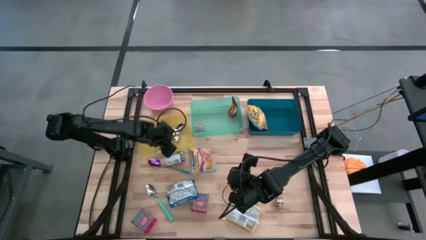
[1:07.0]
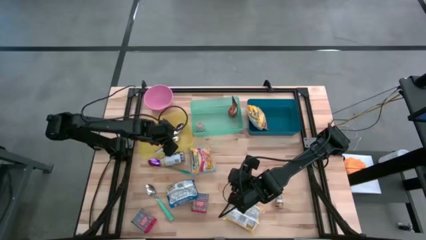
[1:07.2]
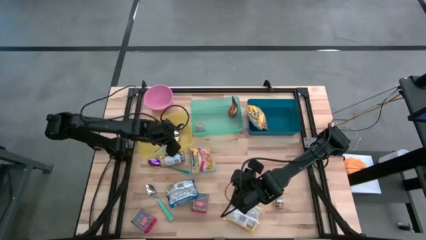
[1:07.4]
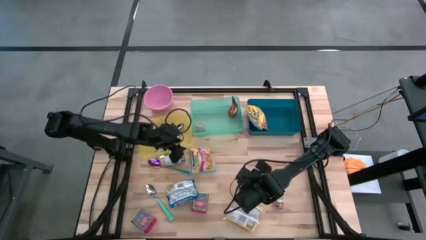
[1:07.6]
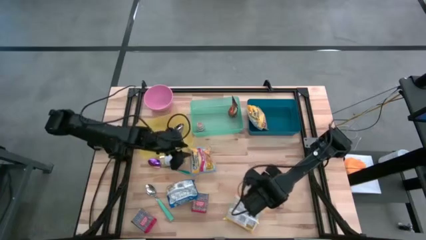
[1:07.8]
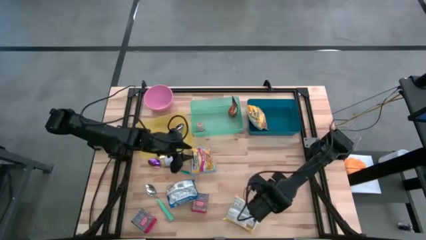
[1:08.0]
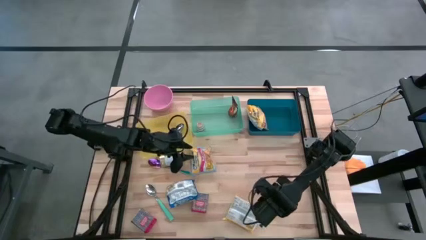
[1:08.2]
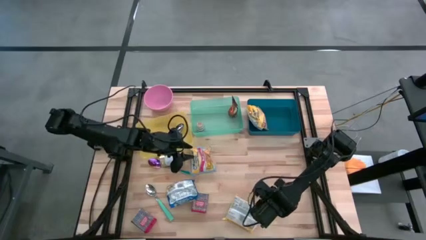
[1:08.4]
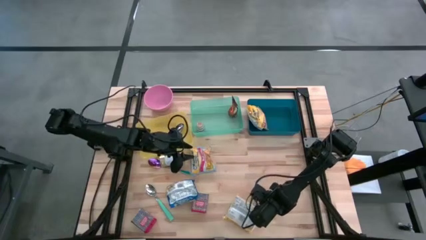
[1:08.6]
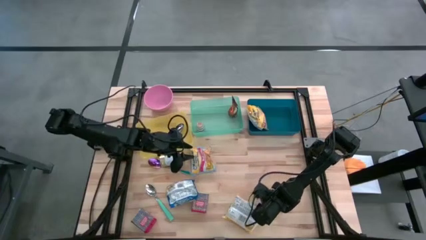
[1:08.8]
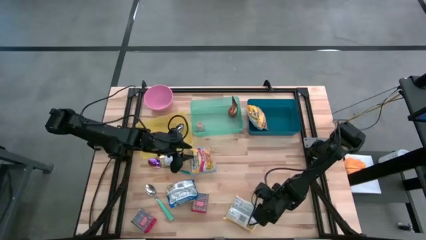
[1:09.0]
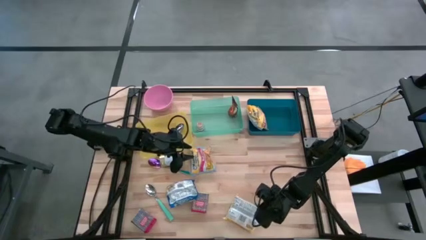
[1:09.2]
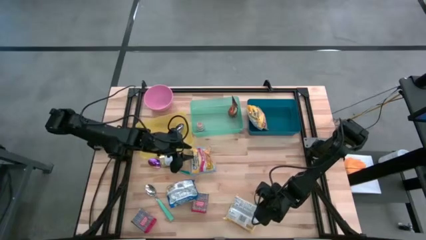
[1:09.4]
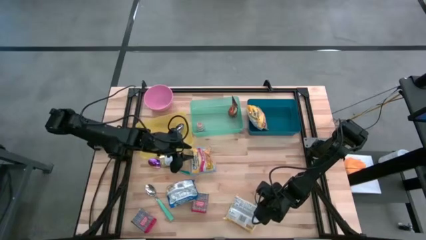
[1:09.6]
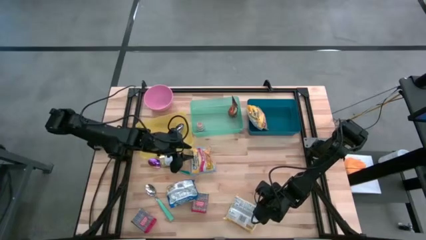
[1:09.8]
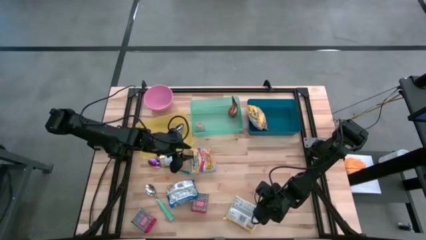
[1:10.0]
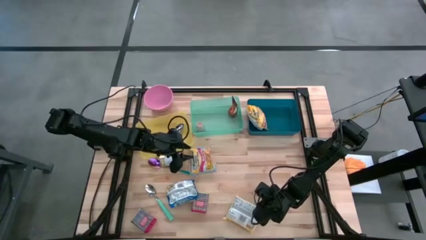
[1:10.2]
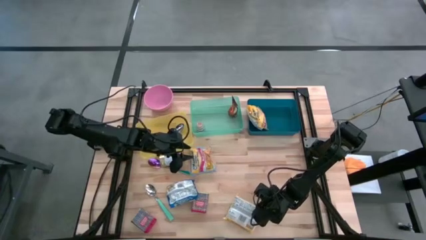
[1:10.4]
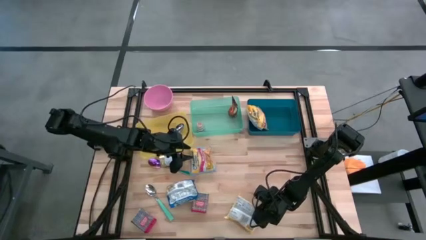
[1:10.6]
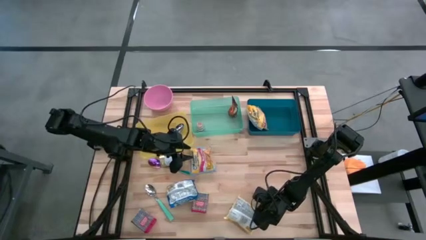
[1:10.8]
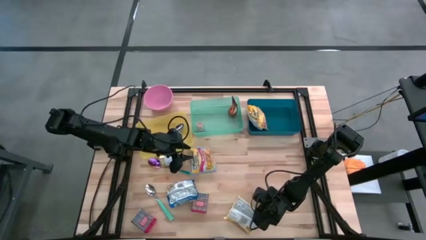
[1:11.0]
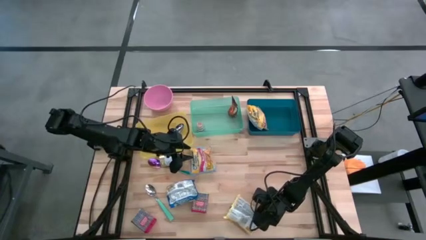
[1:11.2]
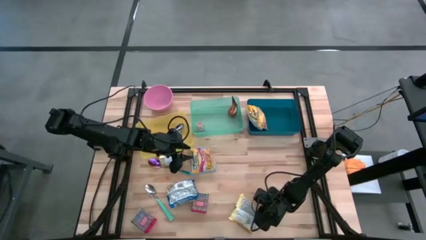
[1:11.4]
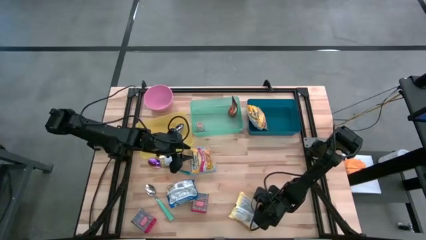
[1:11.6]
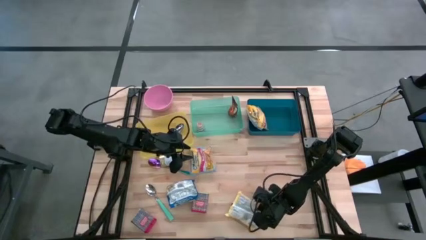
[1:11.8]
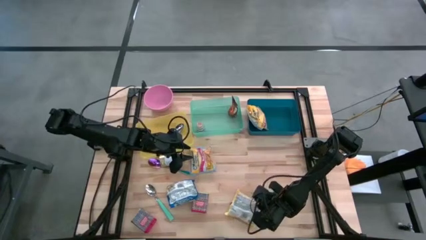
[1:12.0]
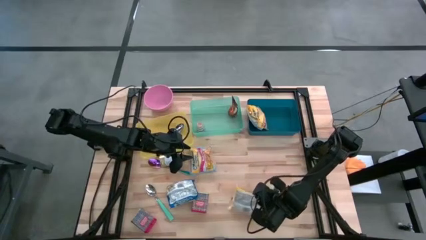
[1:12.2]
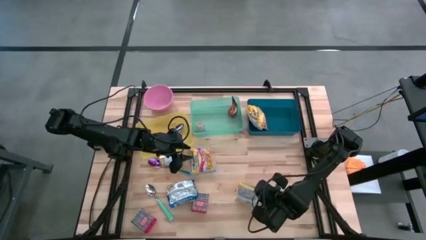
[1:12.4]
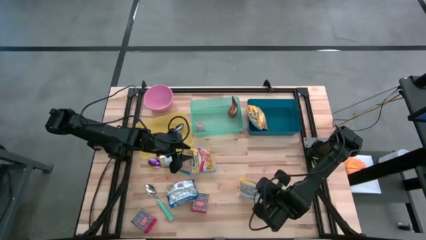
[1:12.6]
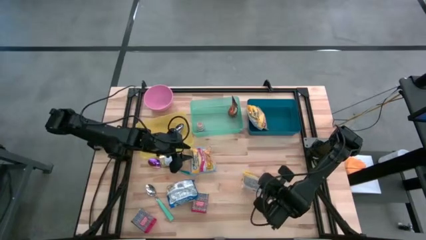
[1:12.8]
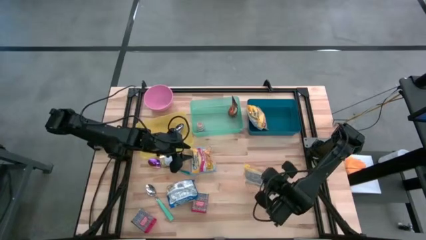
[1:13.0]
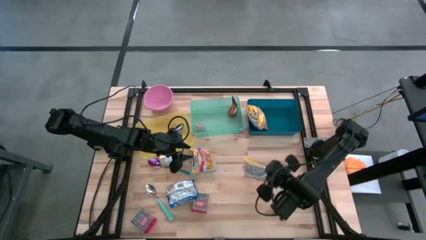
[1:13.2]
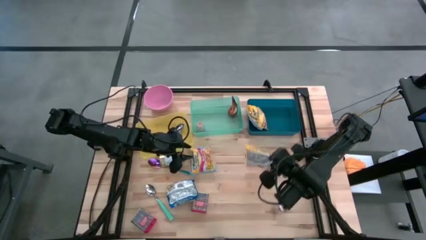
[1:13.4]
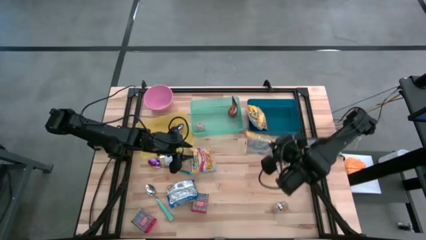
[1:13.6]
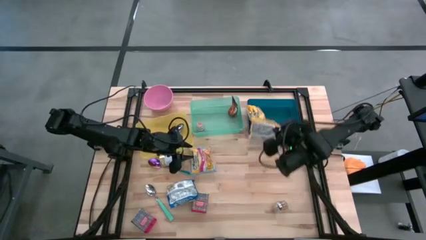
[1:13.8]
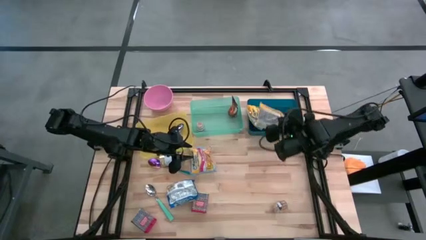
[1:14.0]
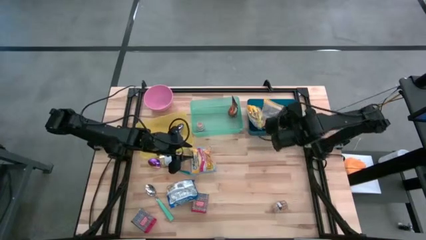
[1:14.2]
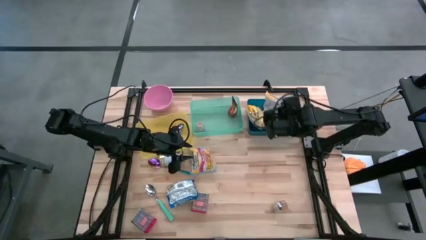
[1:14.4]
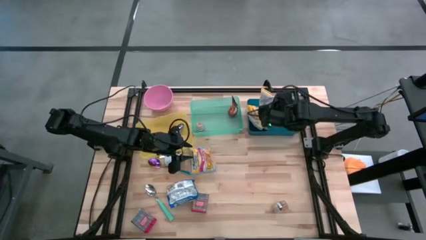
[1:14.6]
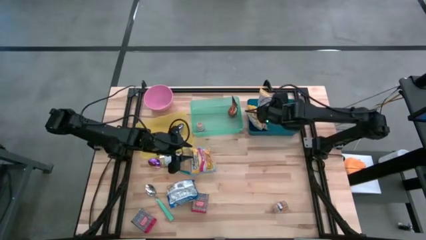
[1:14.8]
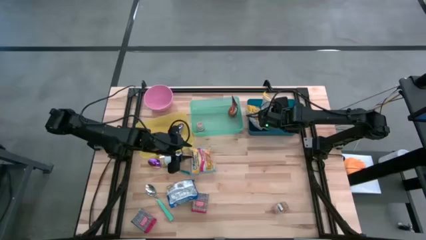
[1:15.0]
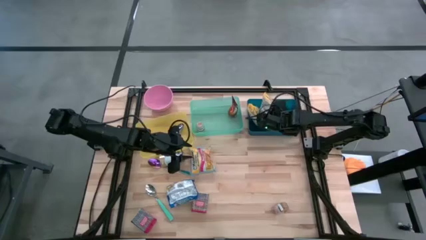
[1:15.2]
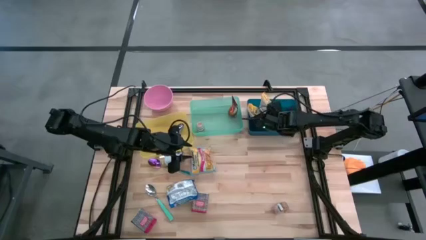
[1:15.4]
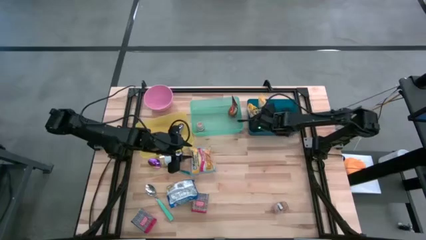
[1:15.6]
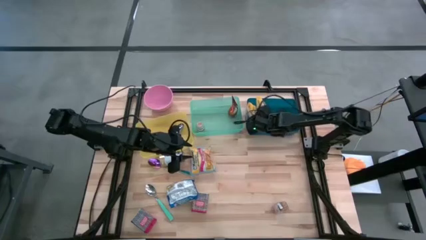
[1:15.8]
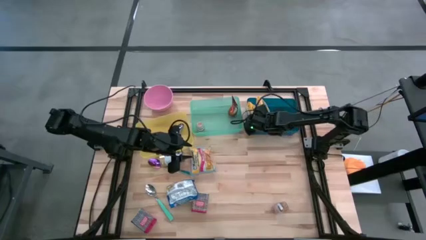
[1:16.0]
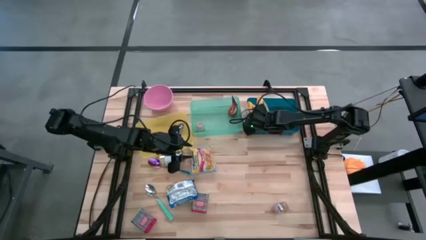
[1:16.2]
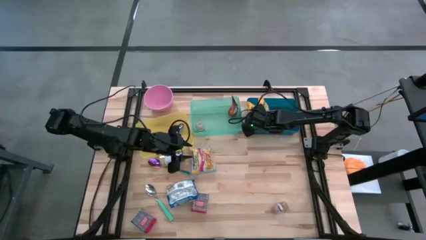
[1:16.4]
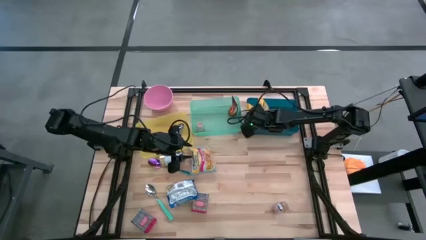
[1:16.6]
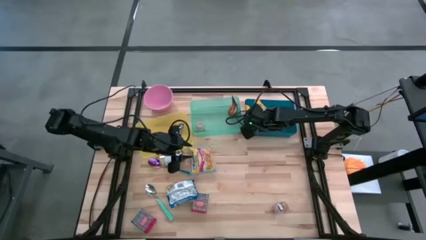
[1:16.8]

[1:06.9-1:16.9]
Put the yellow noodle pack into the blue bin

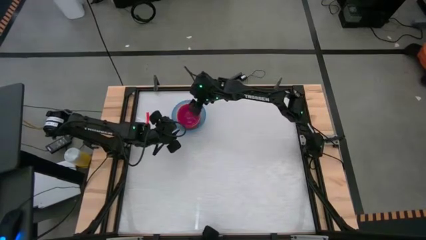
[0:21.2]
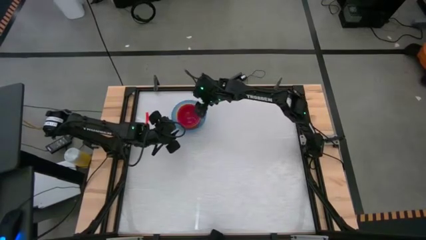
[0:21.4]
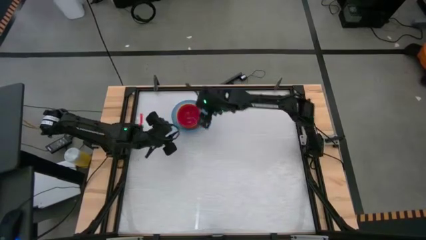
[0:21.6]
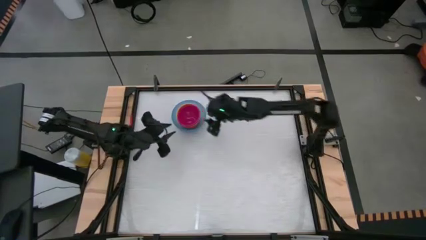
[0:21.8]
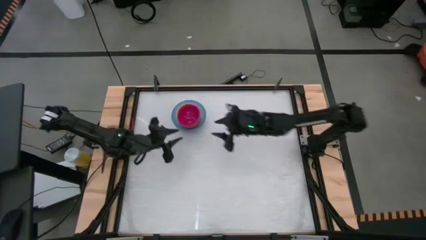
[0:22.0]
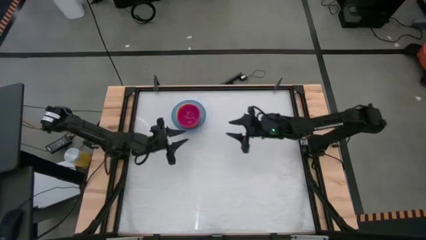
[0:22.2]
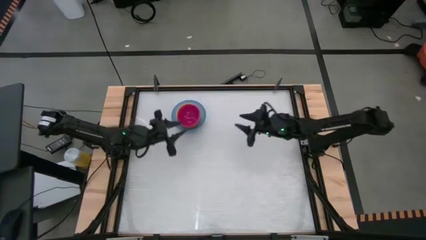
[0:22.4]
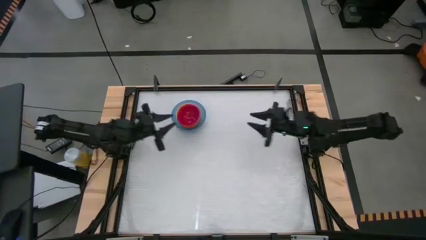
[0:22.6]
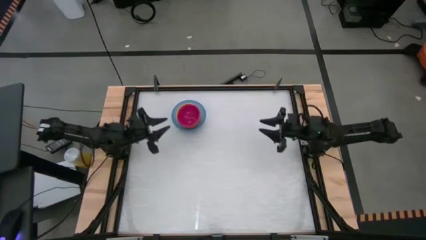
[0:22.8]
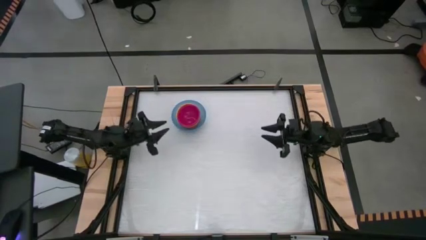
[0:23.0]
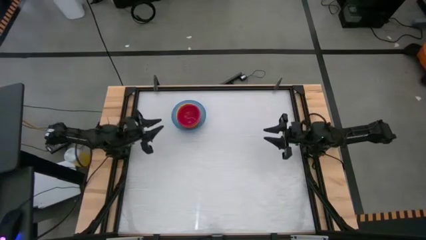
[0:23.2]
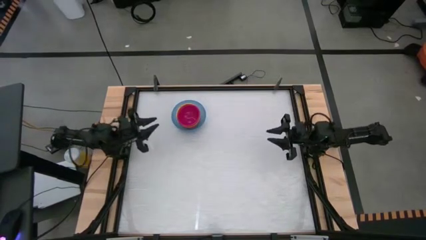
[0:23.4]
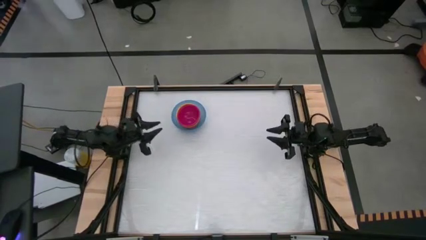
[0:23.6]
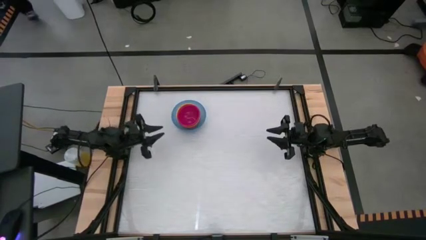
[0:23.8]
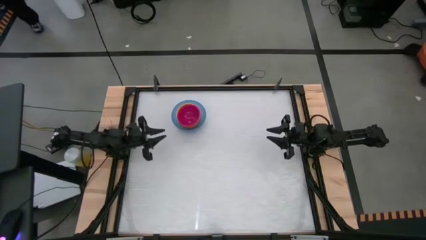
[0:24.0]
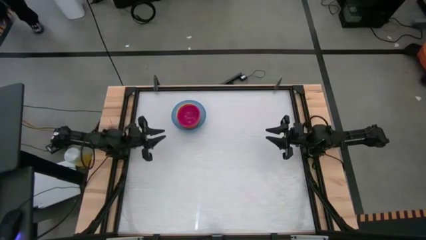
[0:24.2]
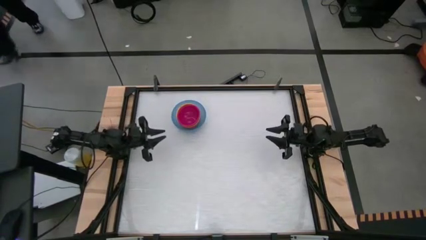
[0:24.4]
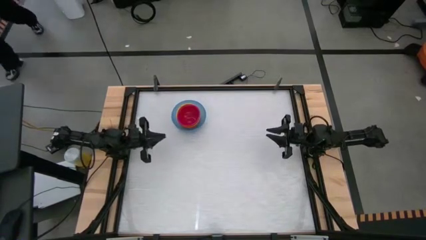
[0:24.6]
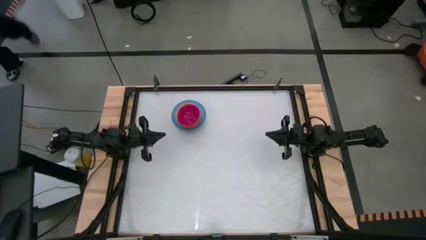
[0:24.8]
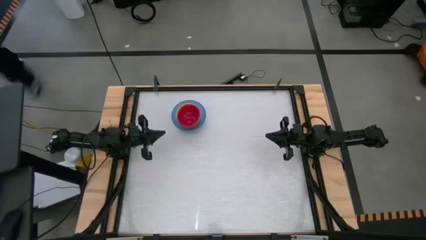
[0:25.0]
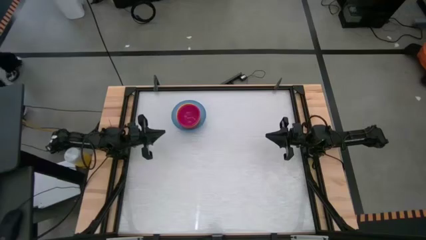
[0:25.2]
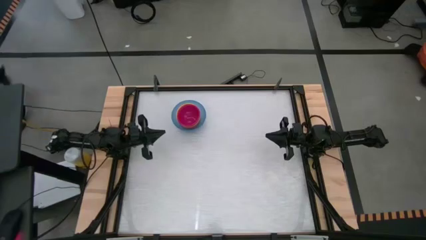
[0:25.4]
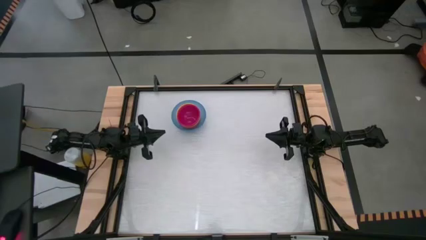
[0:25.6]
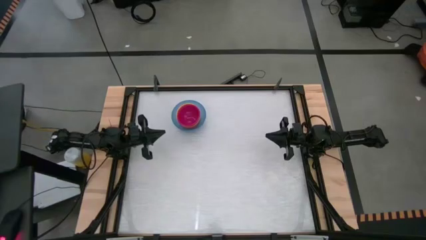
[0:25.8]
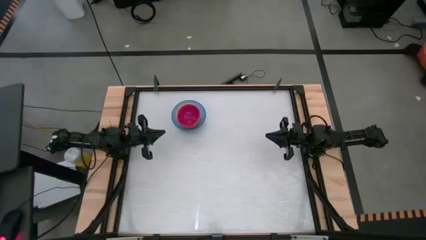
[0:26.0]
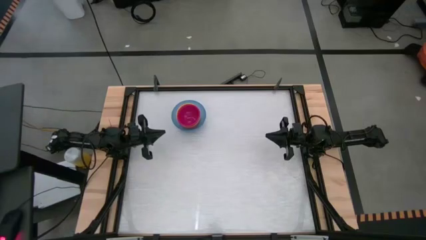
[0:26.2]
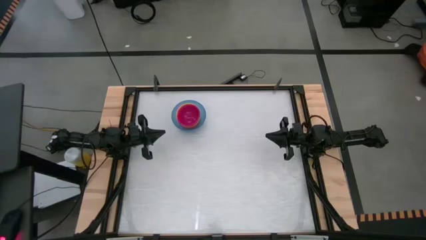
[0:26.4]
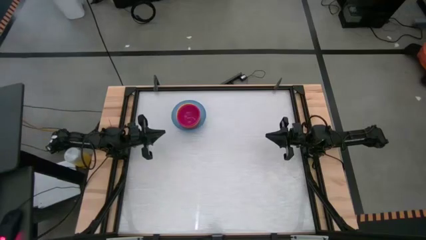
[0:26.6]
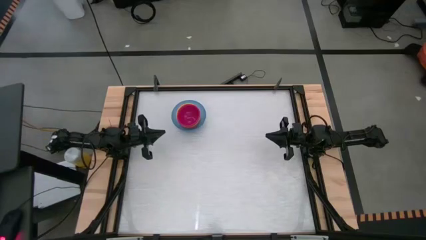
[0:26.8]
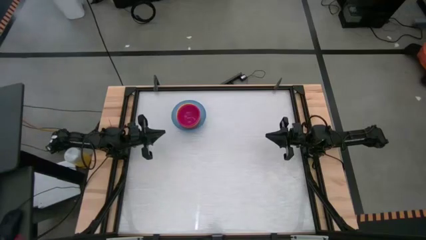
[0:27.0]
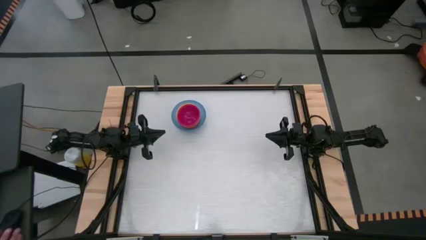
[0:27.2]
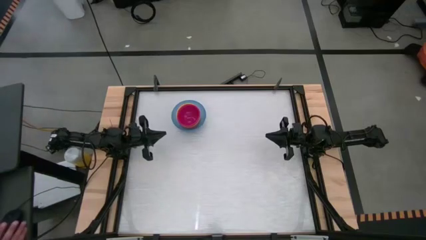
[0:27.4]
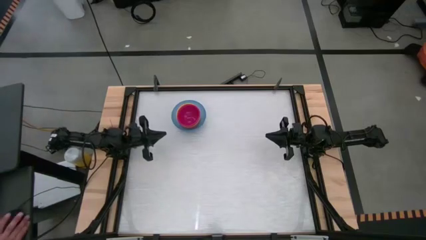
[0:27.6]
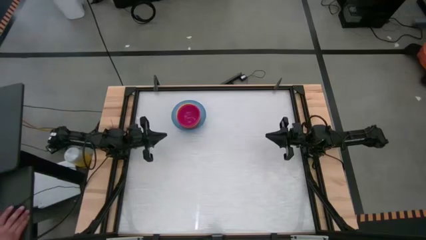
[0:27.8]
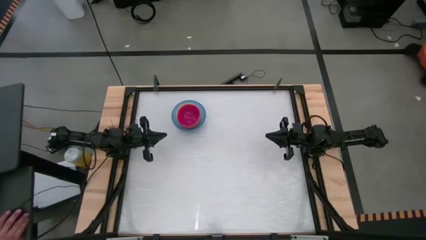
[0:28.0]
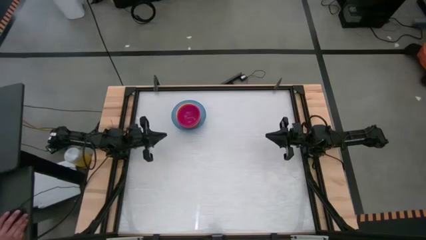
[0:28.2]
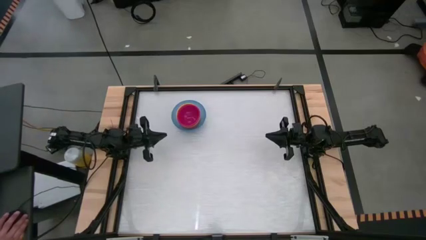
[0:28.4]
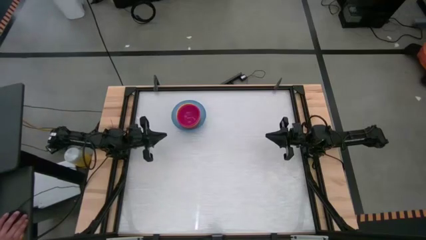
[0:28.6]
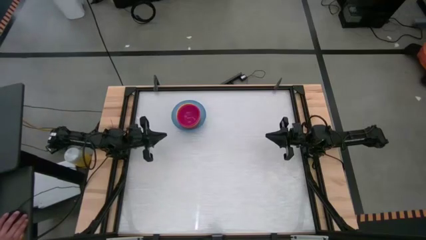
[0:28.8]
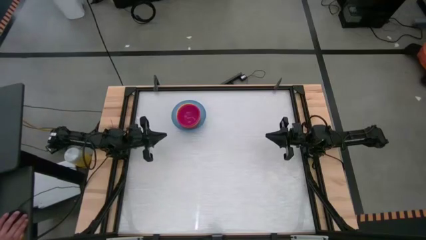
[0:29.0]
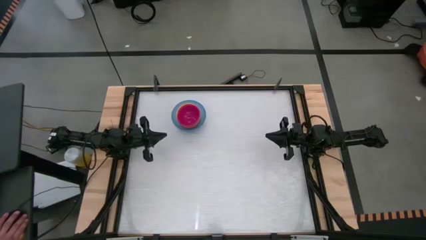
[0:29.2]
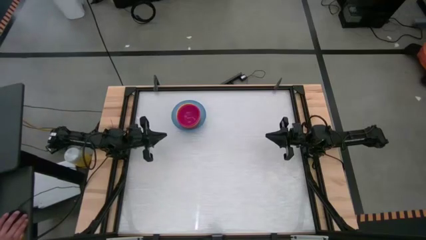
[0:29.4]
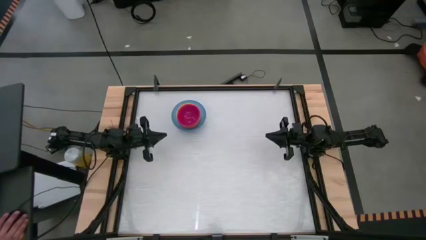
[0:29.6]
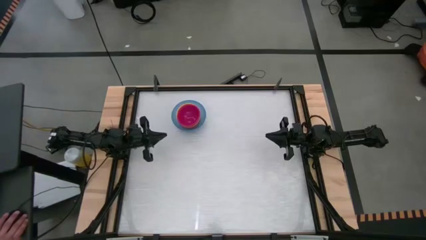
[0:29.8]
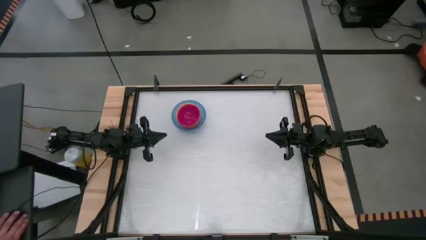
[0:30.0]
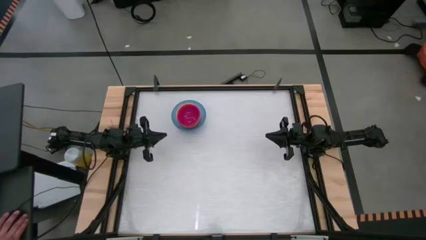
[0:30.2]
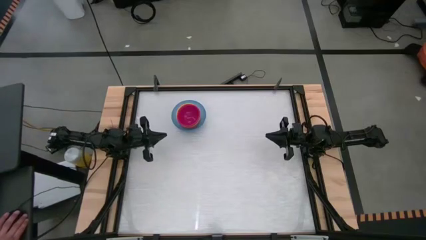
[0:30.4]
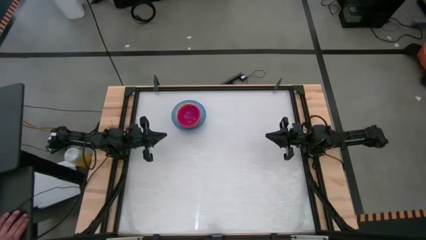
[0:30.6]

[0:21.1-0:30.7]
Return to Home Position
